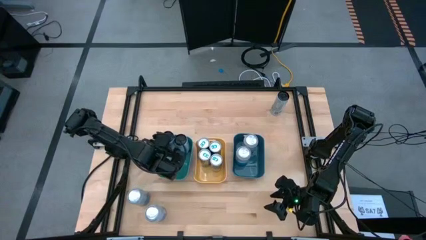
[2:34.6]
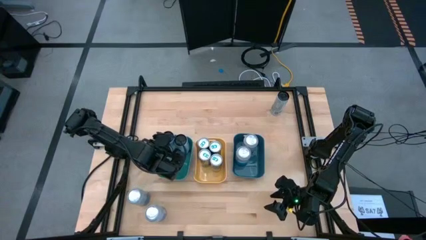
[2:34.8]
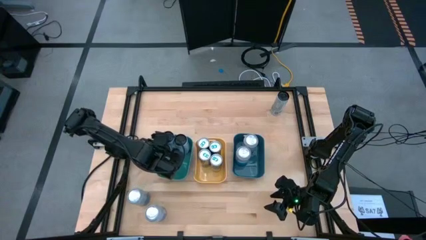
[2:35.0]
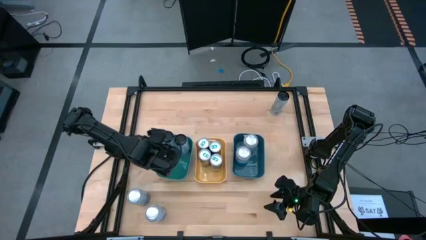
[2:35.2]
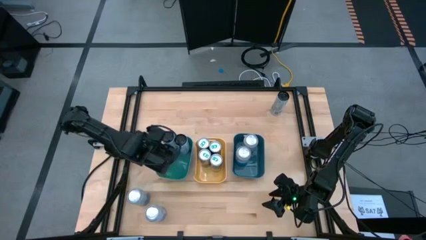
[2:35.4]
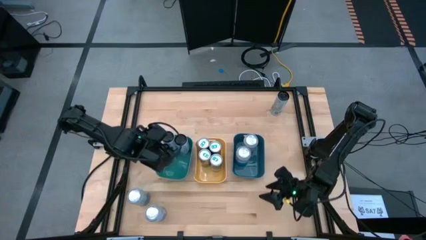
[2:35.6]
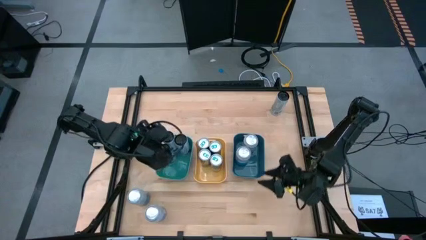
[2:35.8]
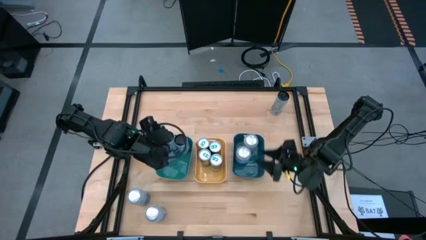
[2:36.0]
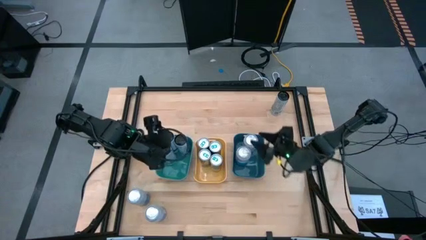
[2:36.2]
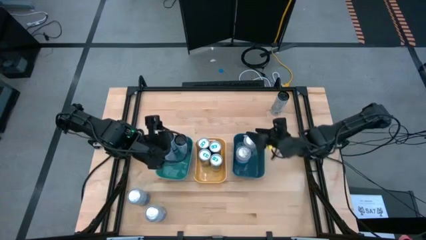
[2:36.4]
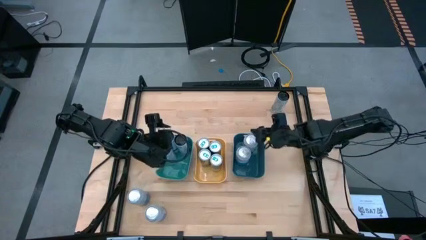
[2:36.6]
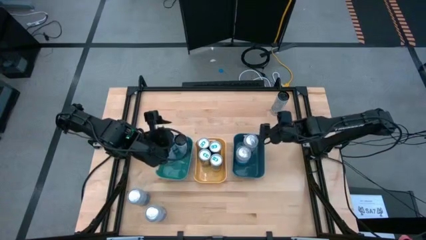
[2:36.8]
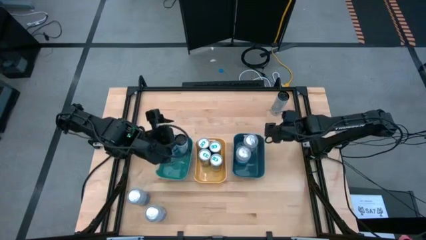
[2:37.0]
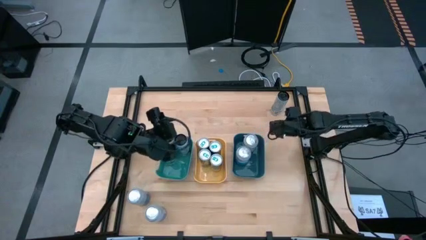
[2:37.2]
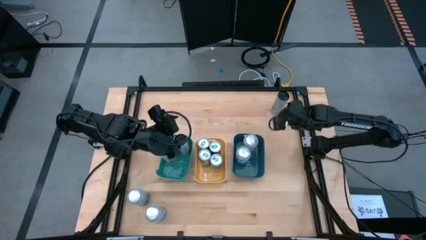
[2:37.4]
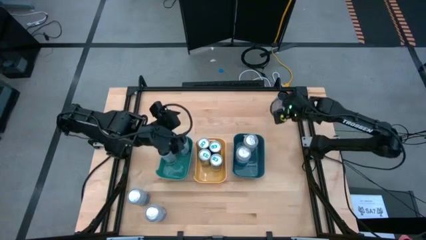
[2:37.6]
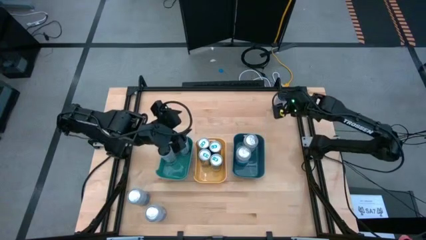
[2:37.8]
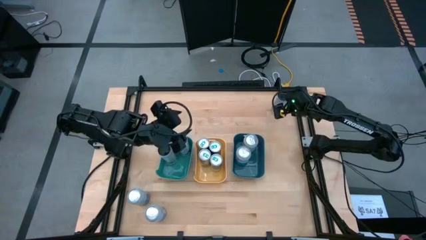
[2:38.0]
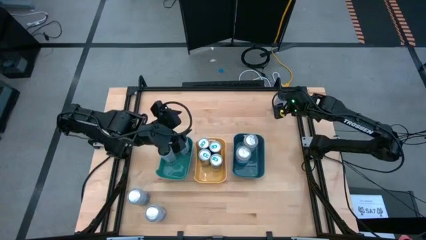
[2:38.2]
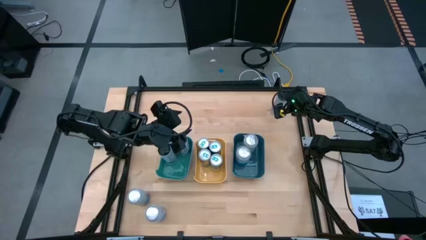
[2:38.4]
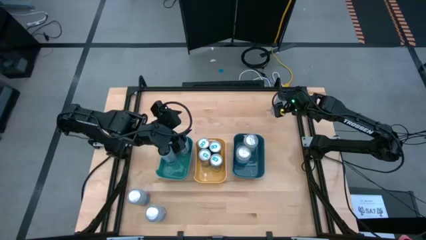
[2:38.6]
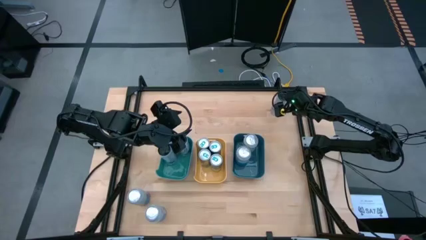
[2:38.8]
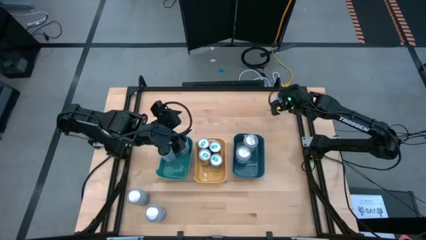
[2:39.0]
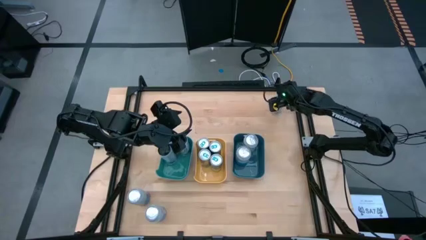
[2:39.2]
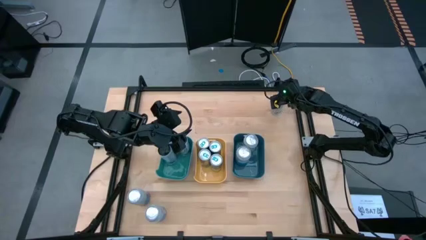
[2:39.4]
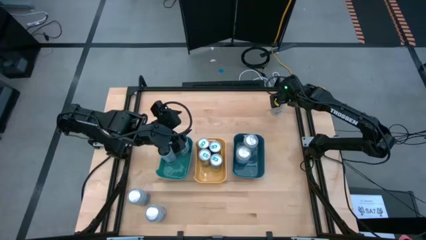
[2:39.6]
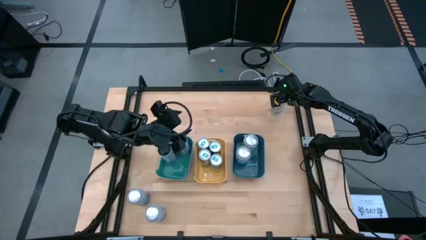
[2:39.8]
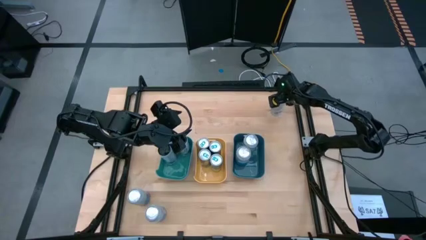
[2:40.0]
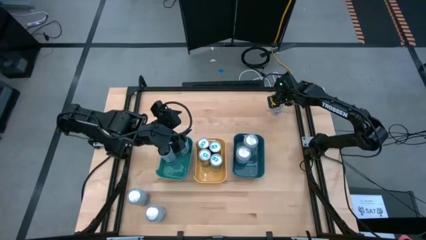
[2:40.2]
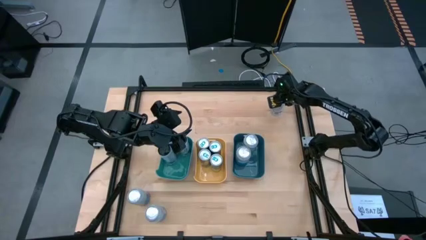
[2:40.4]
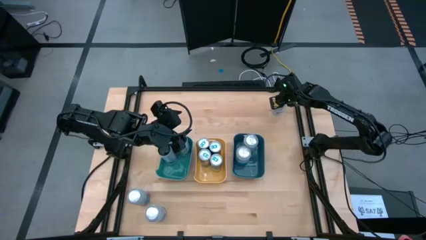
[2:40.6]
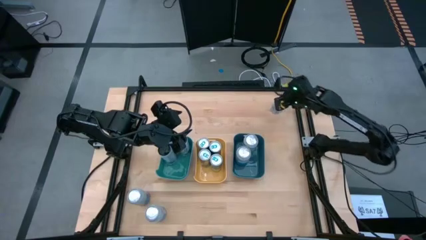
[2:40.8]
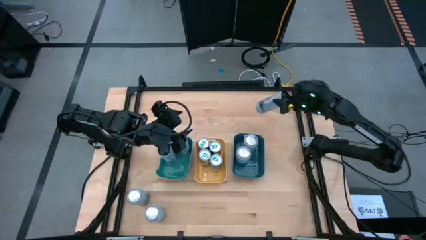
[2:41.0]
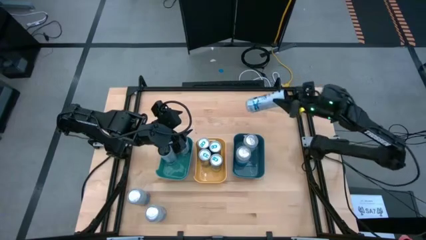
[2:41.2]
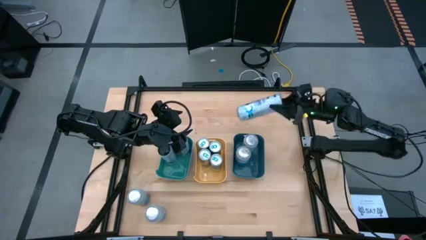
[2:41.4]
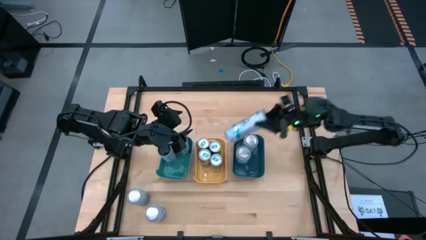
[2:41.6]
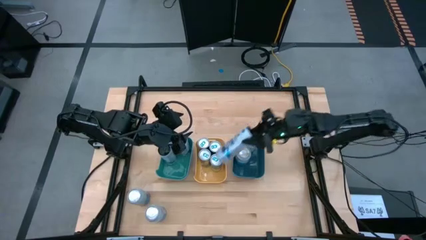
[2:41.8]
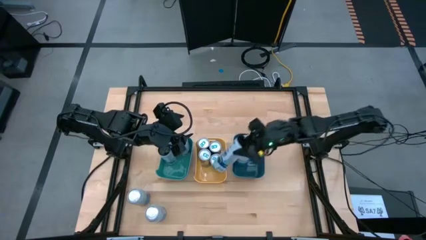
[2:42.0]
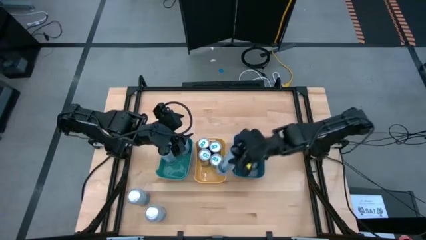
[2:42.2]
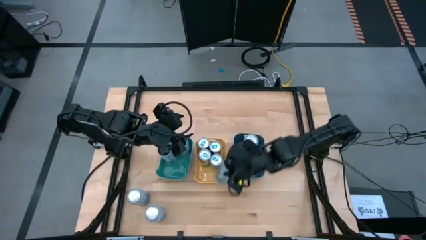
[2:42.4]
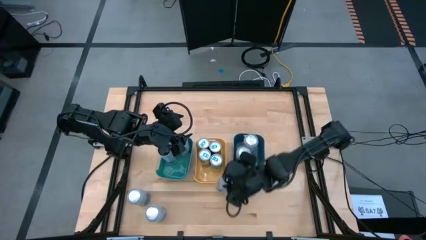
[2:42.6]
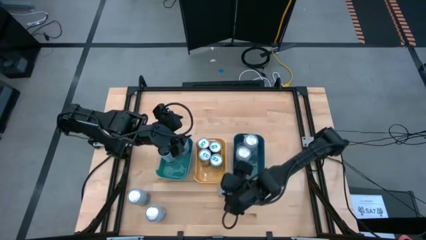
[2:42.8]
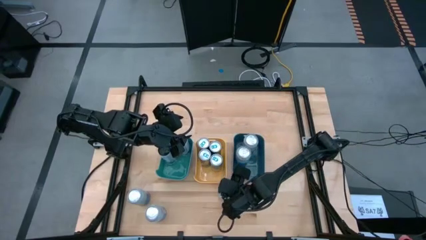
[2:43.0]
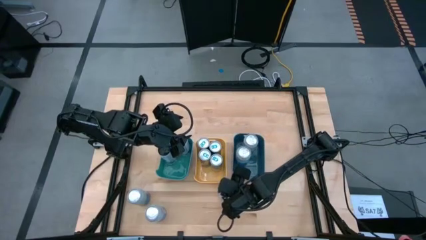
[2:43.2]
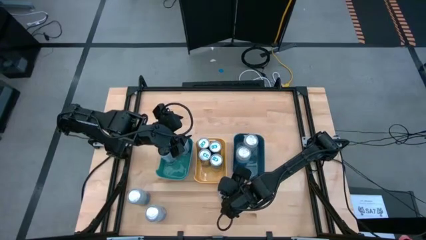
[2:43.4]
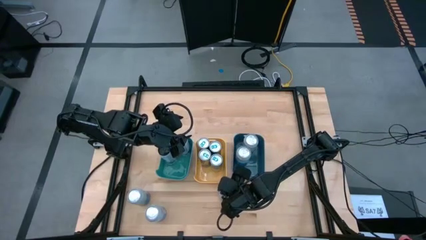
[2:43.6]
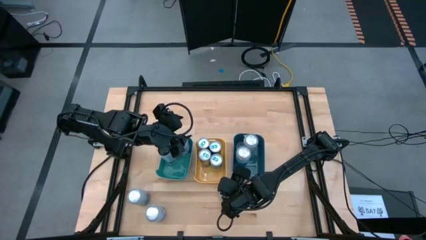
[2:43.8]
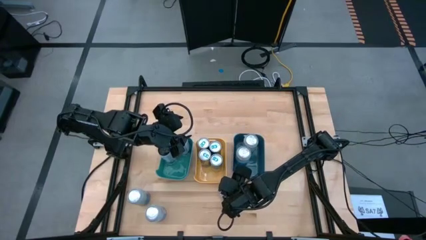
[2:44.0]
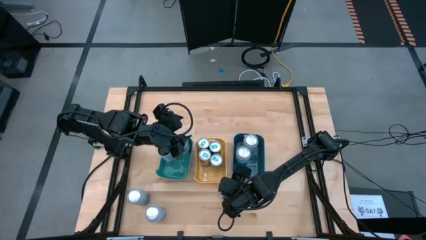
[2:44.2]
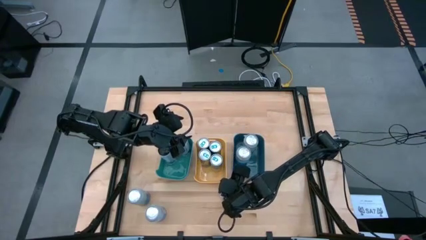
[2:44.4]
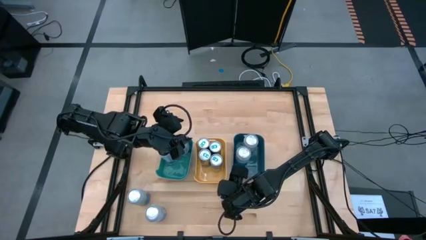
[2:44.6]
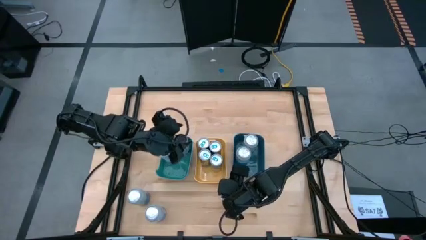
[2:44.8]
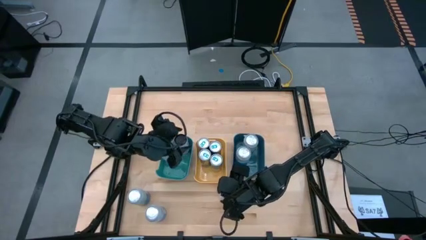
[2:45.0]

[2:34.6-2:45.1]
Task: Sort soda cans
Put the upper right black can into the light green bin
